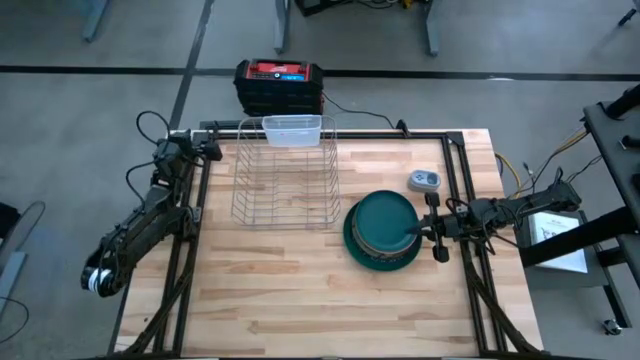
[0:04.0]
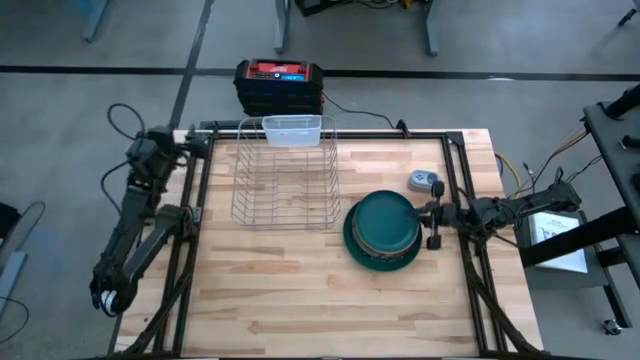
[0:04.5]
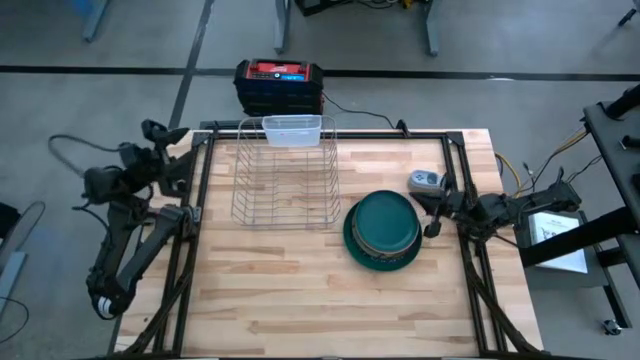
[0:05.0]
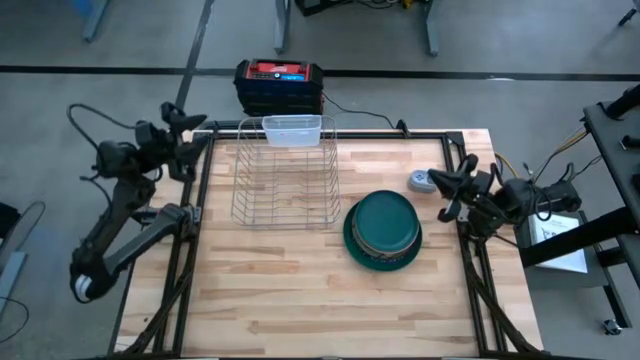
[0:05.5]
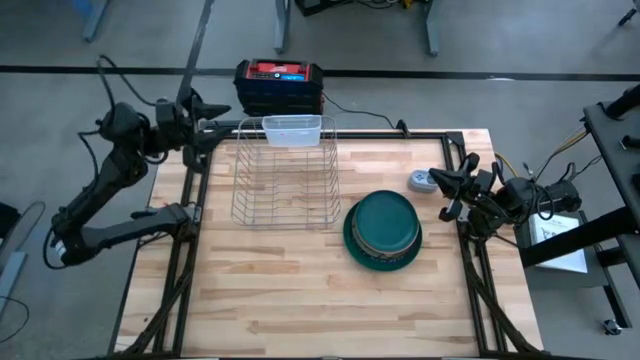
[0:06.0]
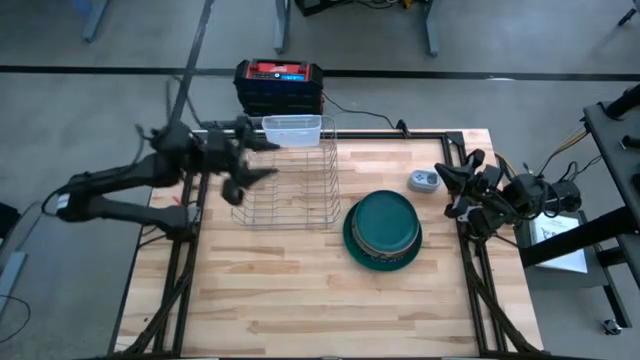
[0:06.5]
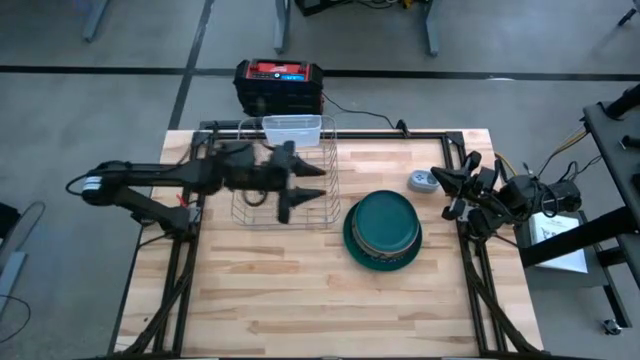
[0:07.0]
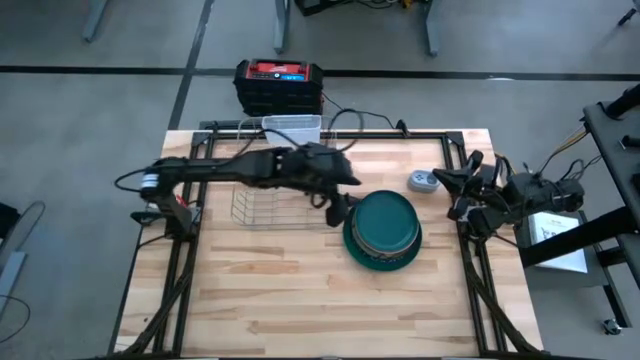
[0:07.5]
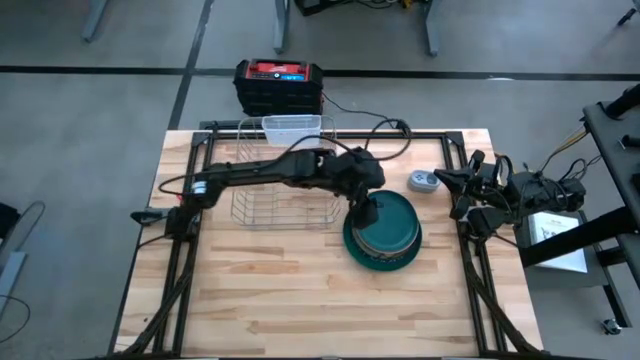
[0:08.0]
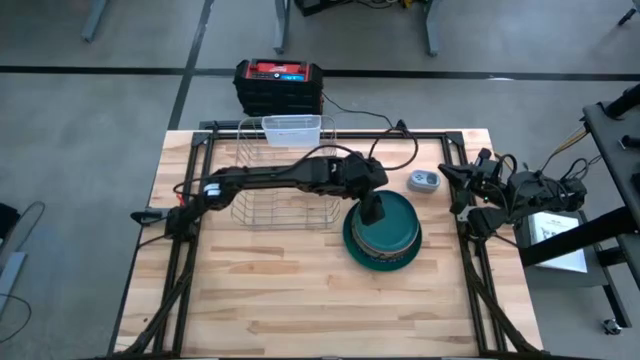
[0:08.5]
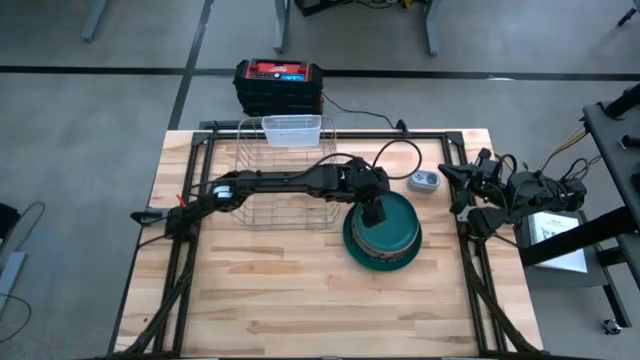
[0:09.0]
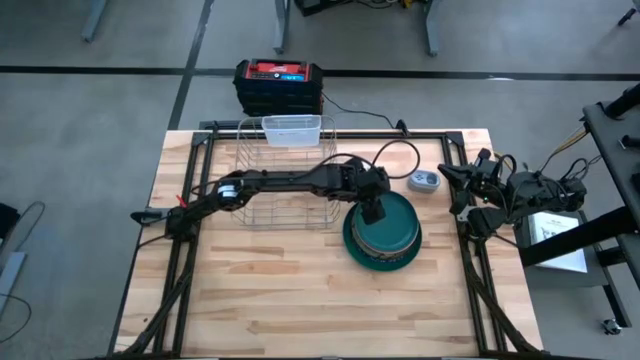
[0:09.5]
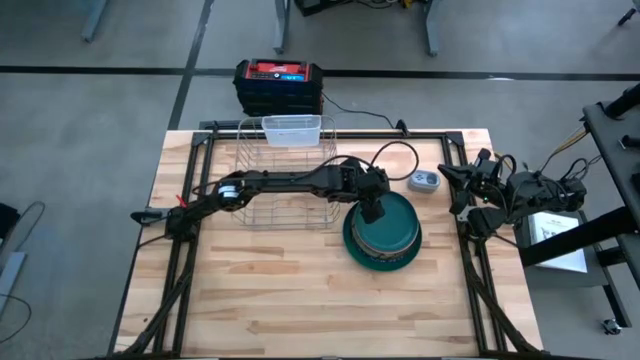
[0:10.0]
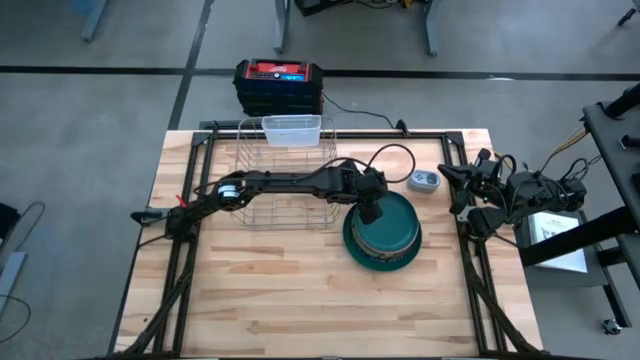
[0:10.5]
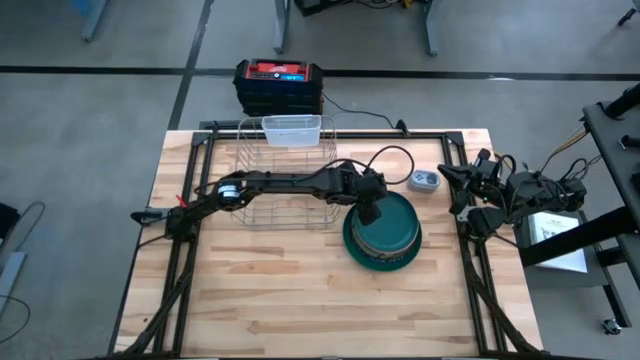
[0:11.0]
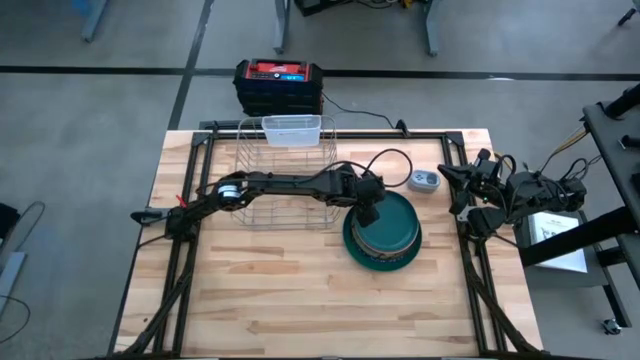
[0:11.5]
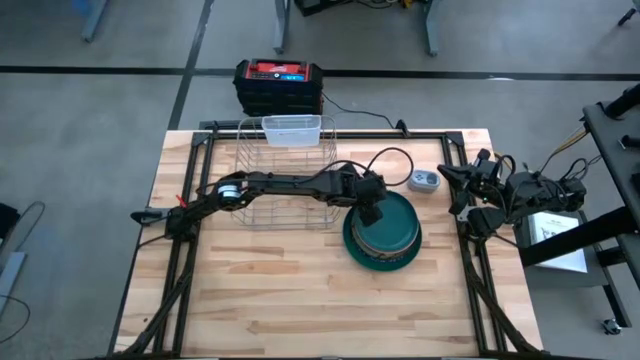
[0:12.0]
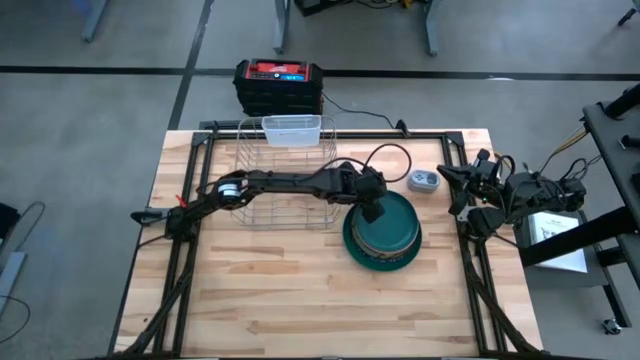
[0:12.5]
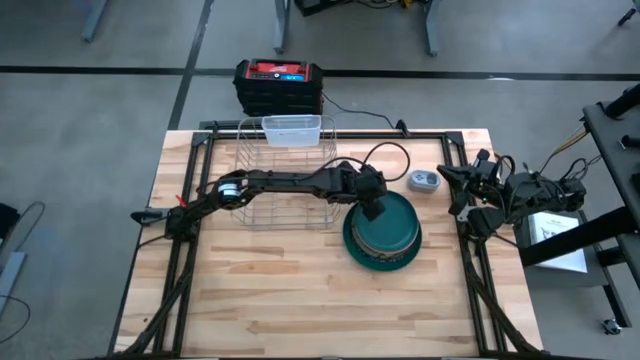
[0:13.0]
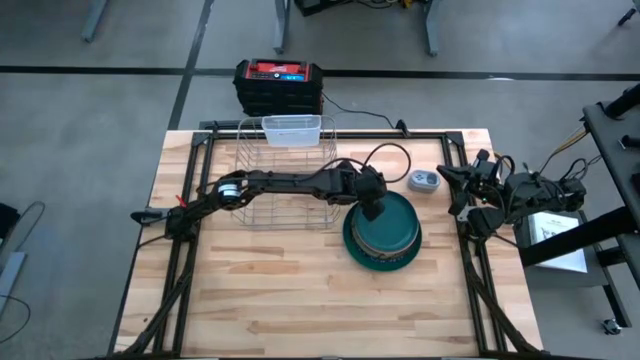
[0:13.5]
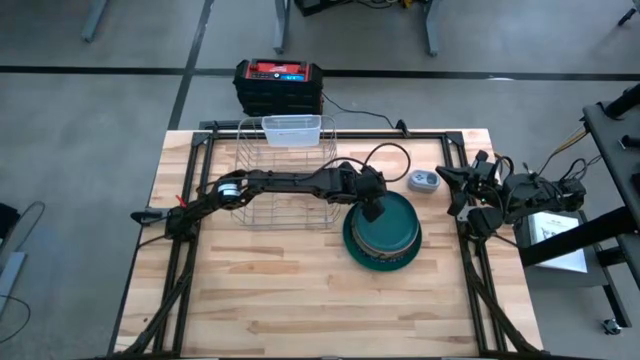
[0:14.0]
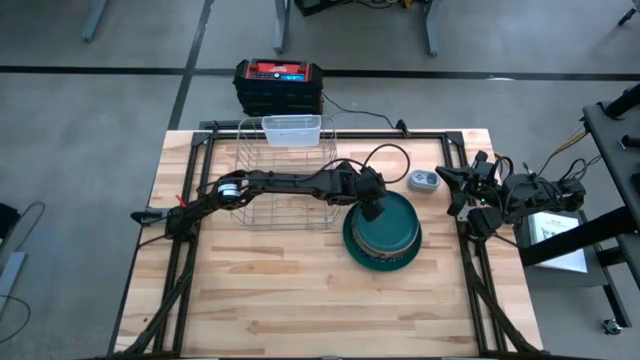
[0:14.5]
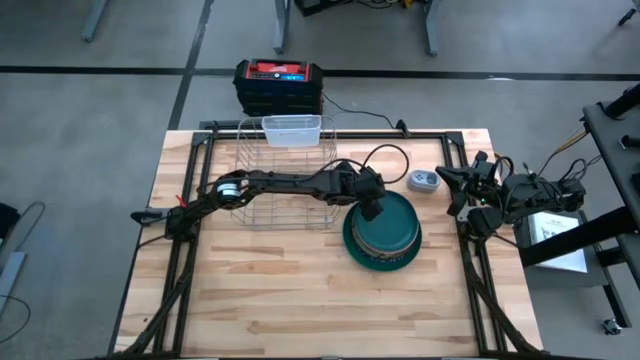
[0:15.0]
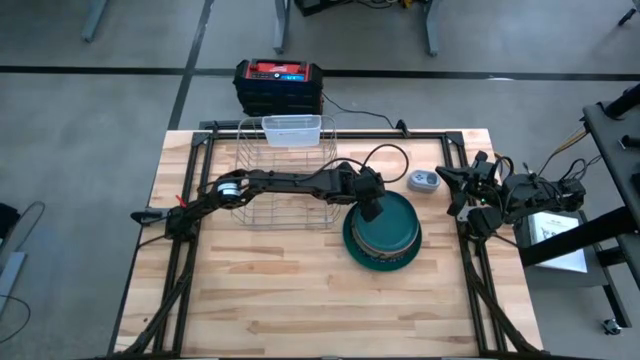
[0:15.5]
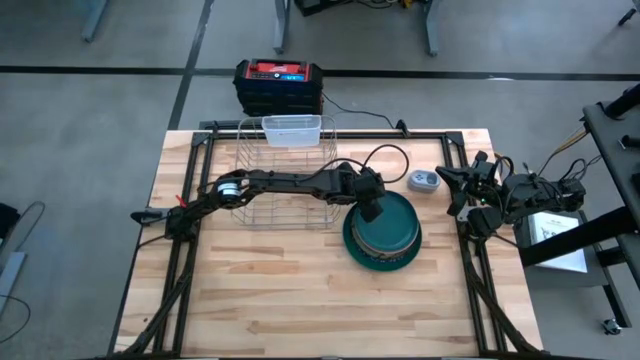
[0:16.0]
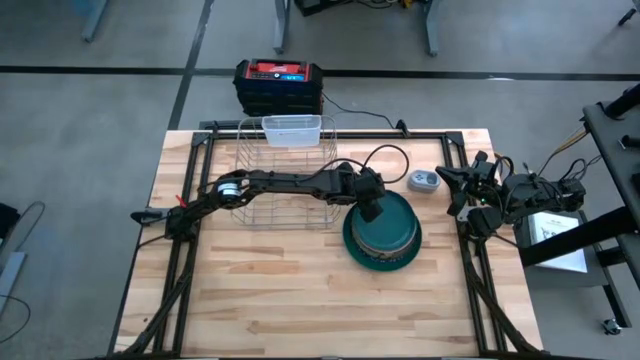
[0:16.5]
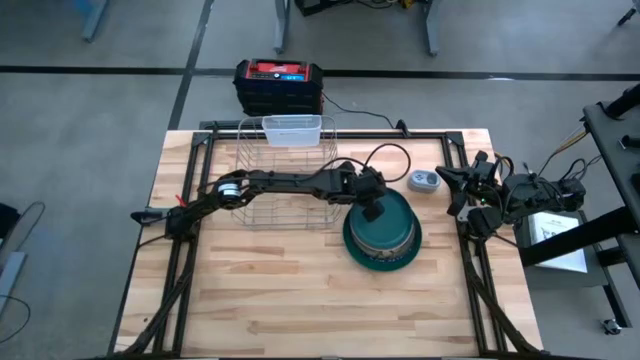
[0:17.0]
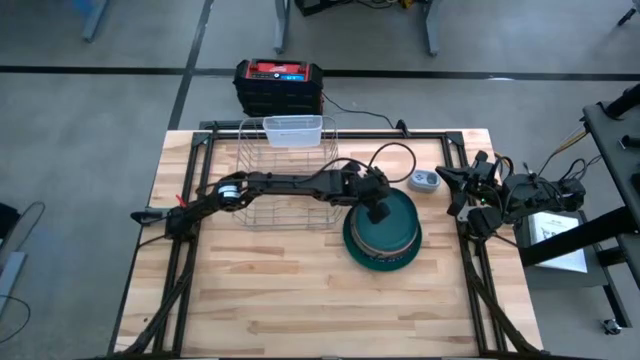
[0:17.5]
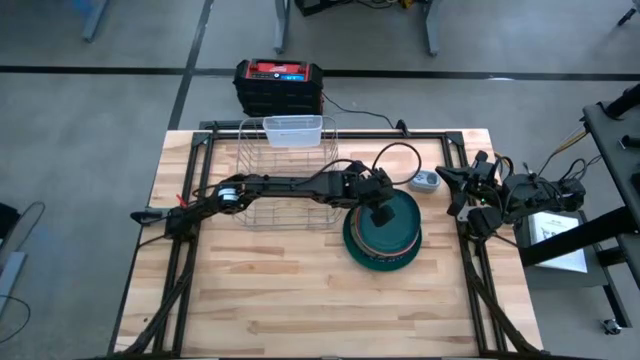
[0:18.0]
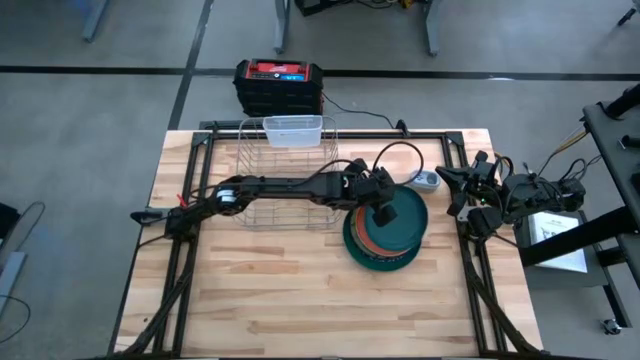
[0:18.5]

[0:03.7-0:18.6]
Task: Sort dishes
Put the dark green plate into the dish rack
